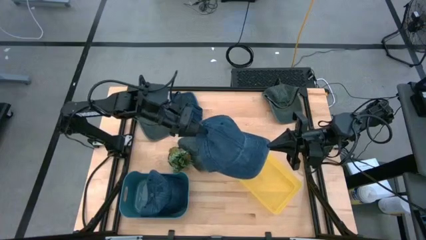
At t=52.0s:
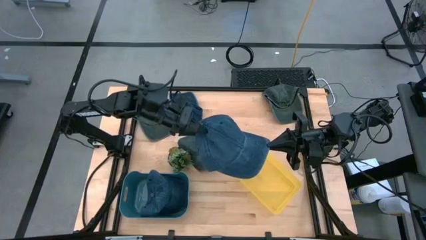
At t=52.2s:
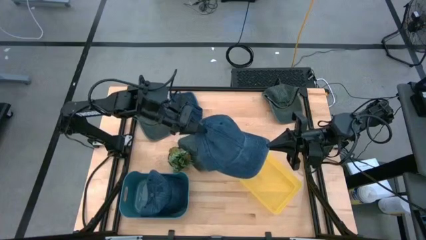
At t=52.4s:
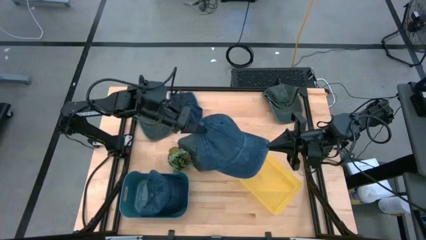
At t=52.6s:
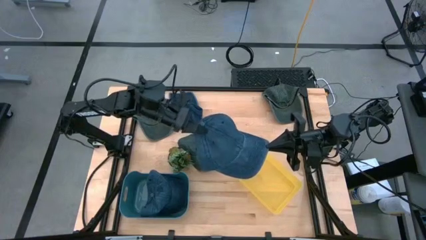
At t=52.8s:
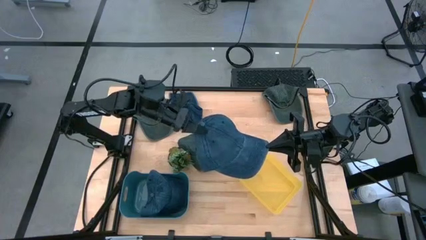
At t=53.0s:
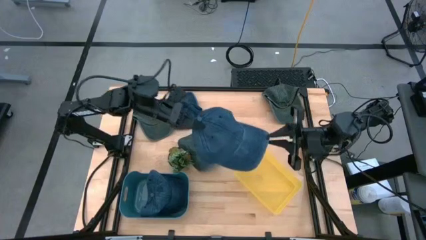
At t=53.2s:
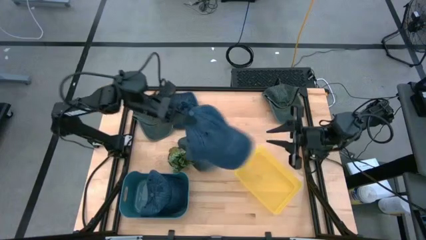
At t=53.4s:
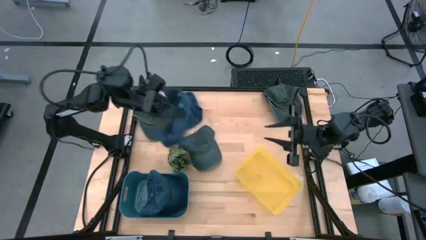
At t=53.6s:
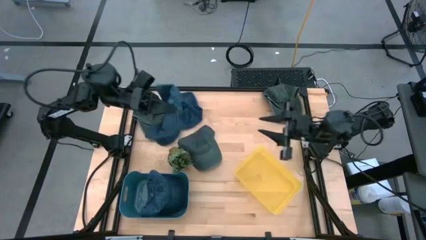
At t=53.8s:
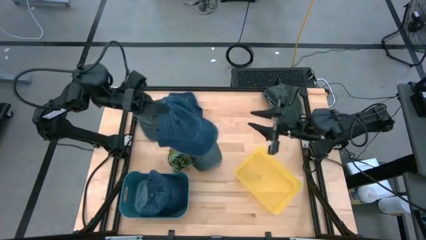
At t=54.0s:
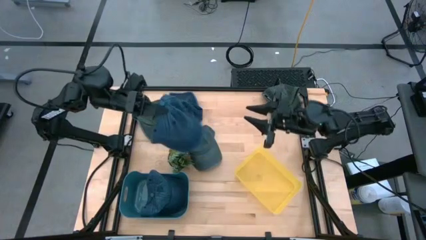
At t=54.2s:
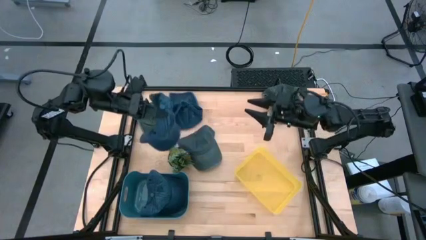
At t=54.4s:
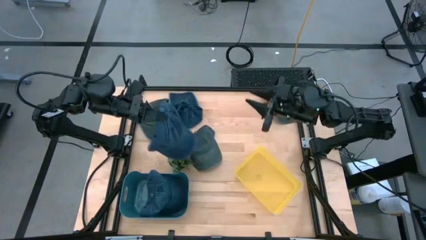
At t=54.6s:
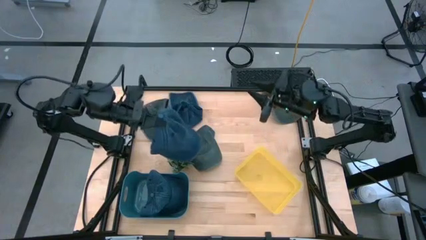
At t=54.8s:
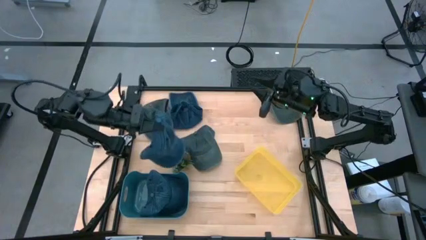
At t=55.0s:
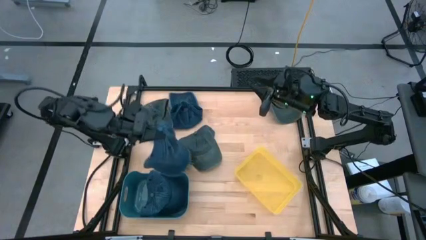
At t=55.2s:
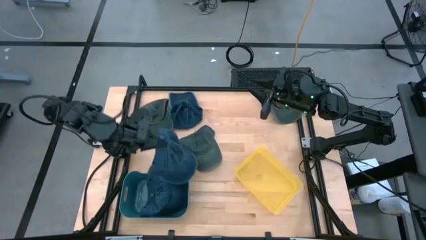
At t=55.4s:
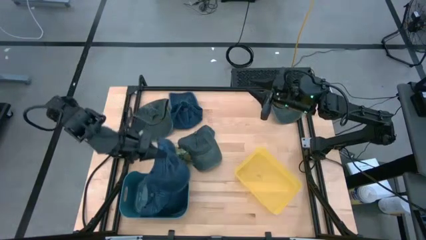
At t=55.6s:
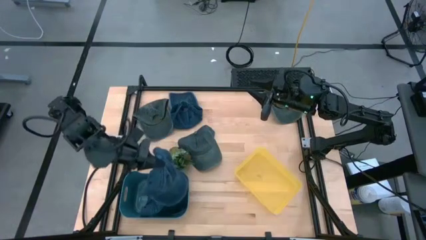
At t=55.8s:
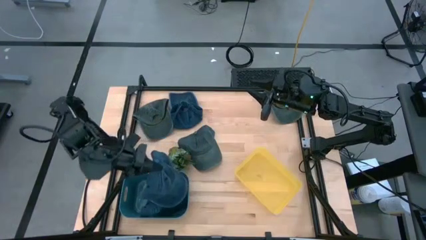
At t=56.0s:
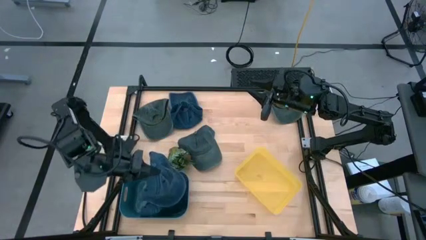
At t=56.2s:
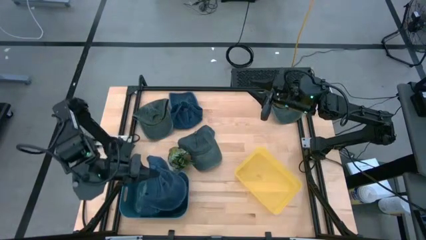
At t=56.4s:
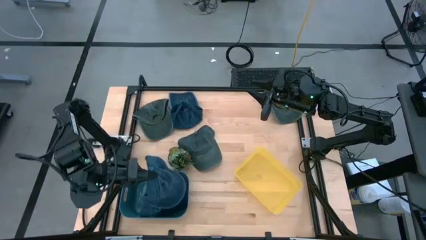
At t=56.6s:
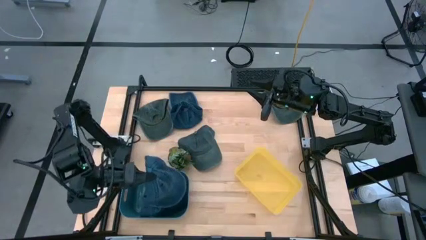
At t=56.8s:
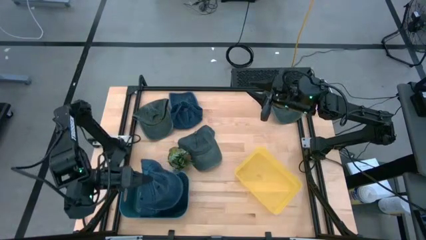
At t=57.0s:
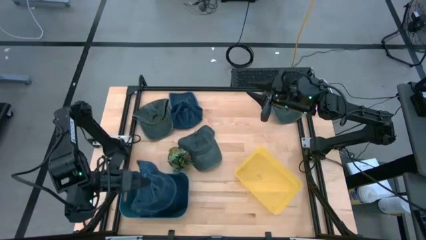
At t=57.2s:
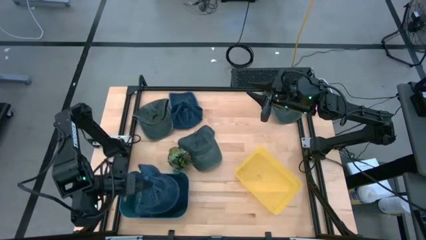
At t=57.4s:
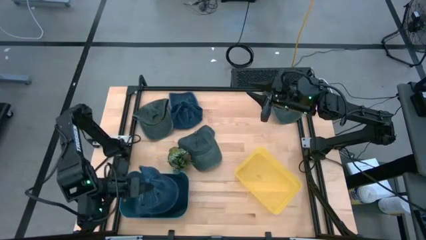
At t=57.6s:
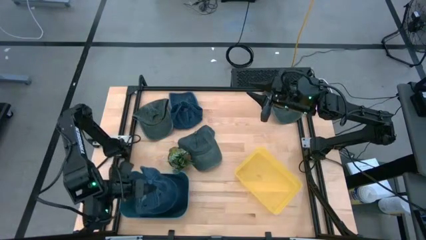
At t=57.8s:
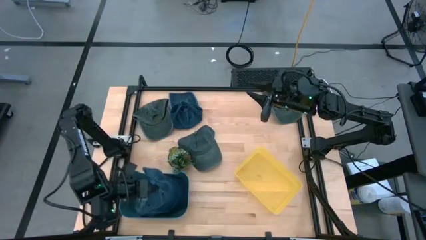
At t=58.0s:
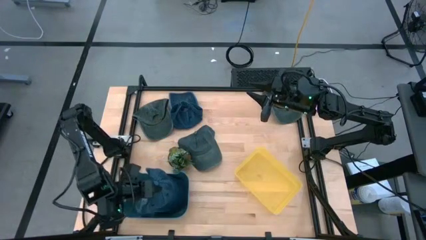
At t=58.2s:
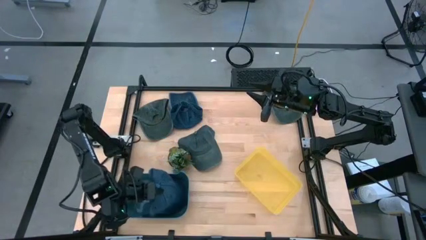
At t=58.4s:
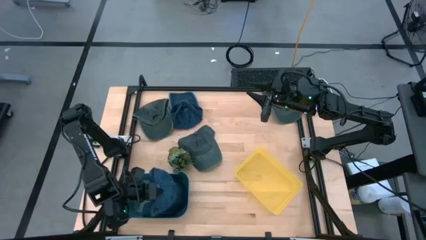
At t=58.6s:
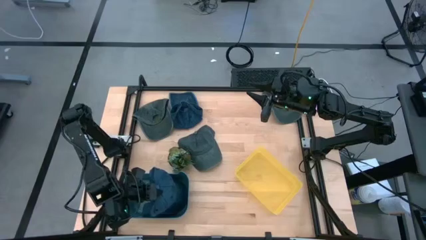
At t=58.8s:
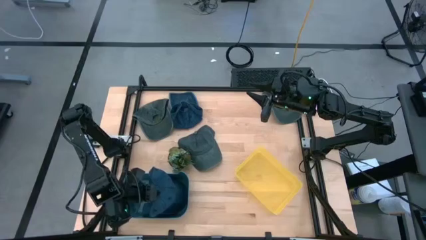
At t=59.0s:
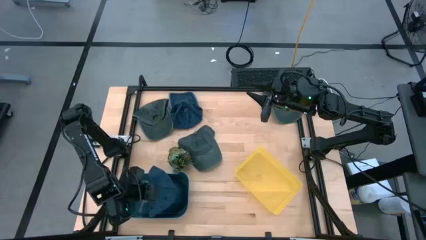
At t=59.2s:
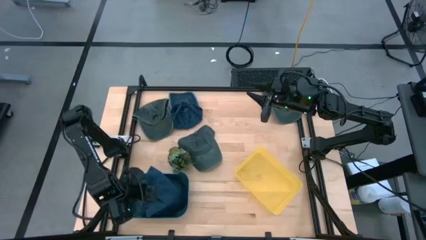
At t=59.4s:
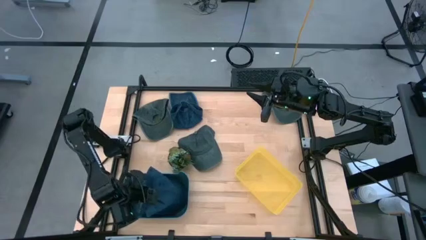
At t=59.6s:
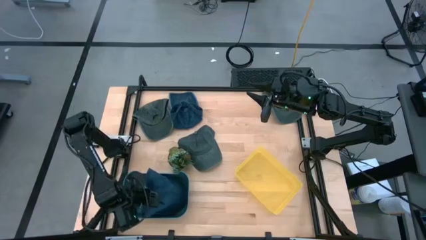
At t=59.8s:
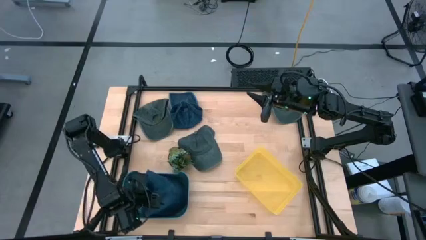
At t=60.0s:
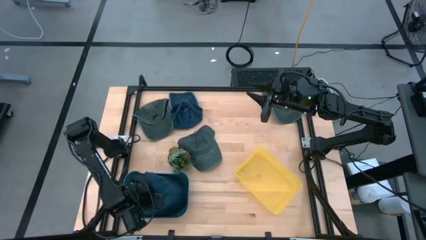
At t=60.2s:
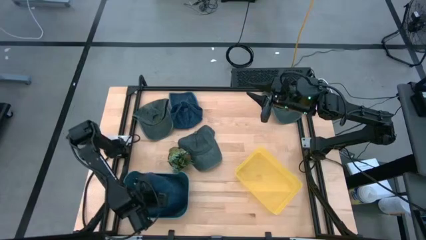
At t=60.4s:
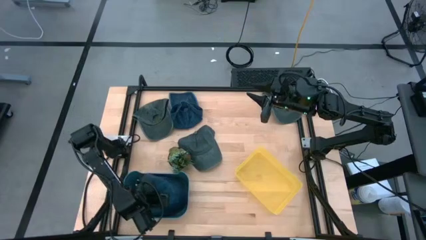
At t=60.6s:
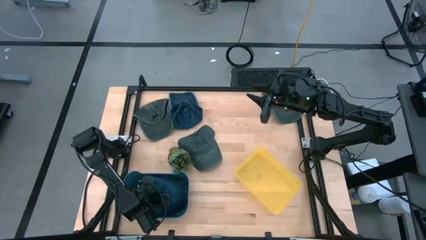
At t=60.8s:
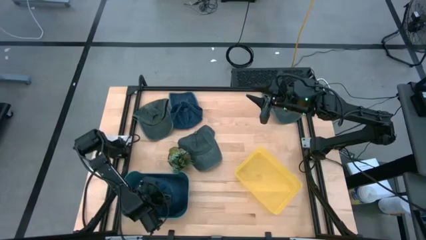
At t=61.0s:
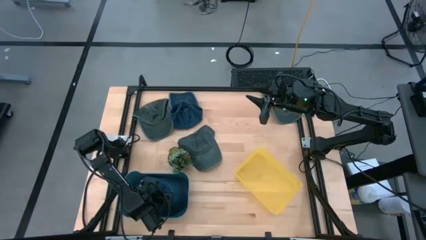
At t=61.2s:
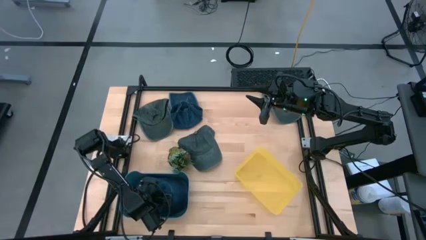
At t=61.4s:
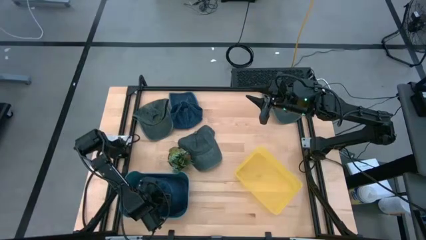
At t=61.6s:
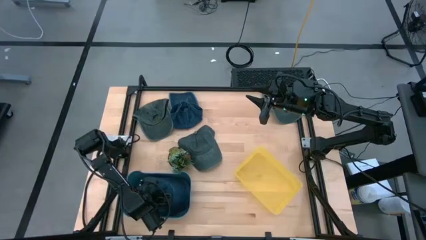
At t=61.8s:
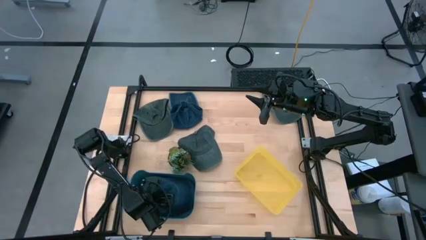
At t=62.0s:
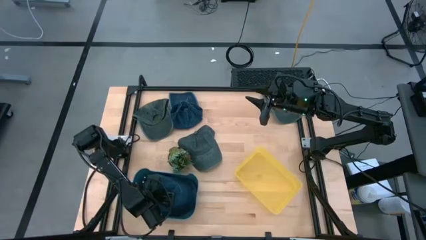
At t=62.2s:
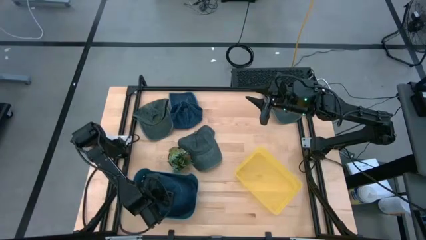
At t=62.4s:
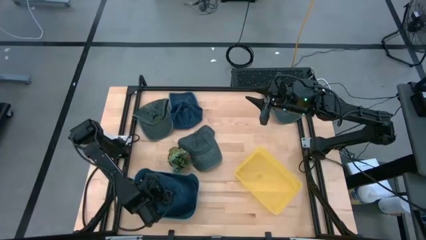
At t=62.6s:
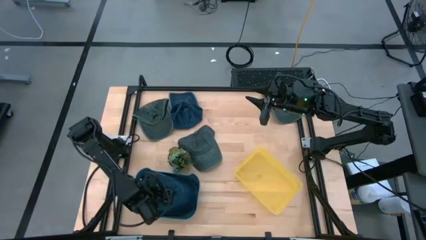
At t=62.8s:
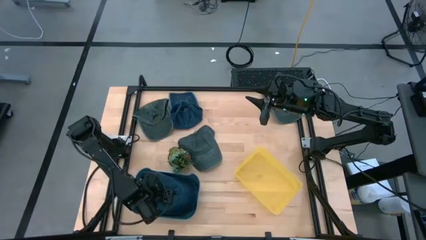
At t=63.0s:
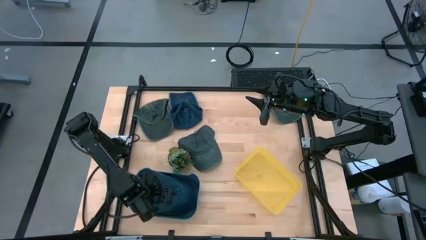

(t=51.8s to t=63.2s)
Task: Pick & Place hat
Put the right blue cap into the blue bin

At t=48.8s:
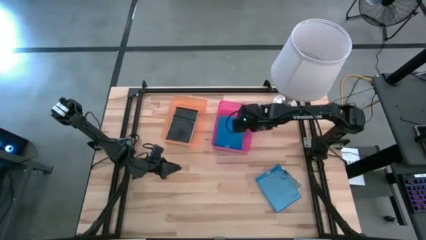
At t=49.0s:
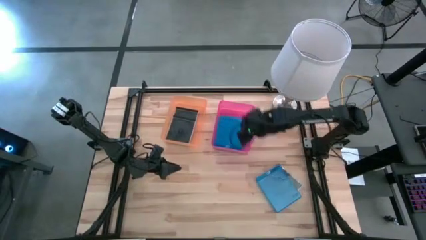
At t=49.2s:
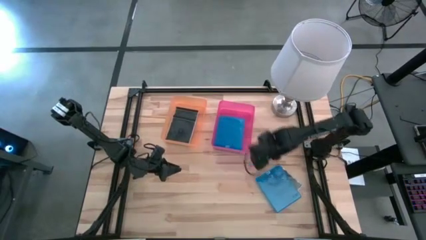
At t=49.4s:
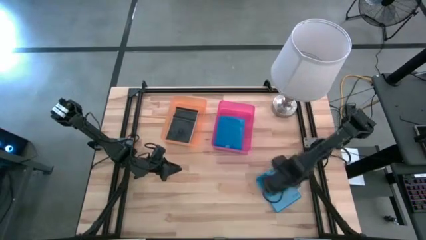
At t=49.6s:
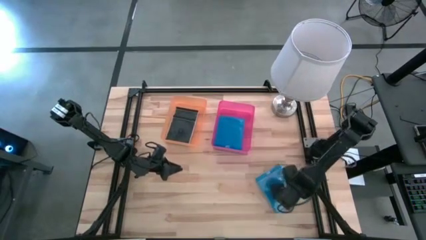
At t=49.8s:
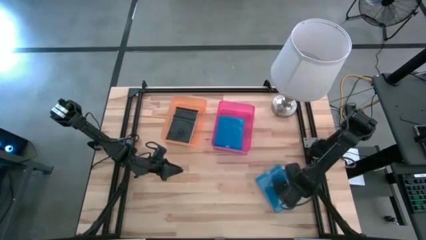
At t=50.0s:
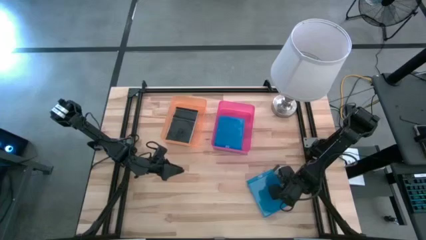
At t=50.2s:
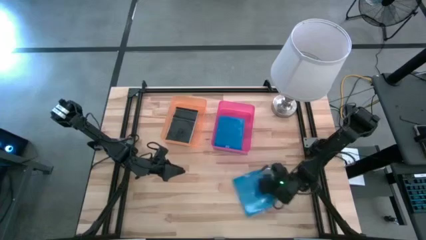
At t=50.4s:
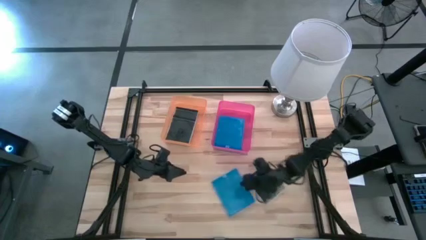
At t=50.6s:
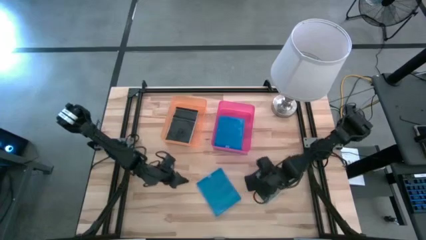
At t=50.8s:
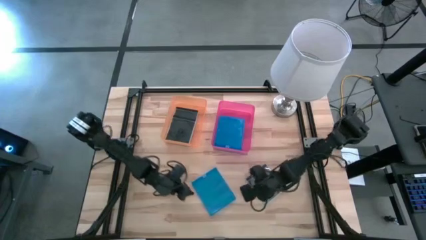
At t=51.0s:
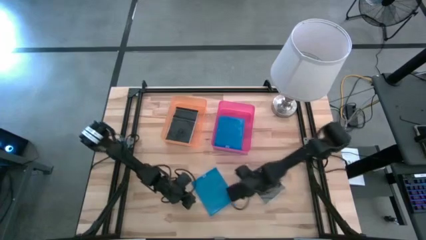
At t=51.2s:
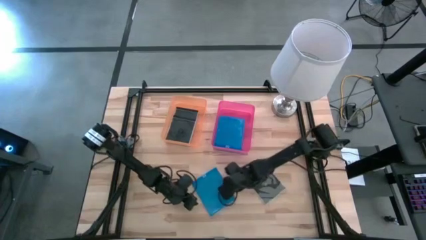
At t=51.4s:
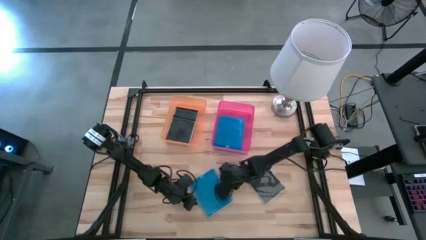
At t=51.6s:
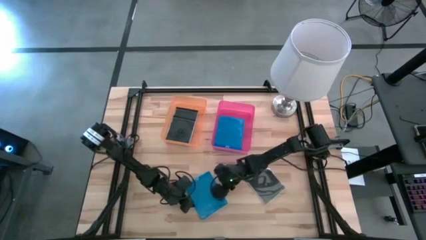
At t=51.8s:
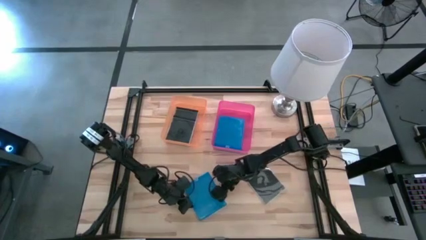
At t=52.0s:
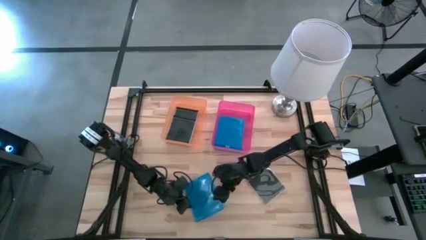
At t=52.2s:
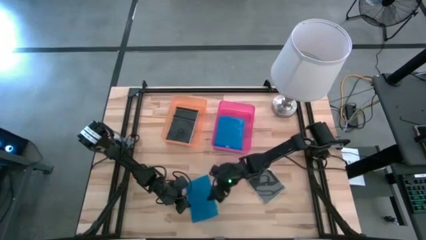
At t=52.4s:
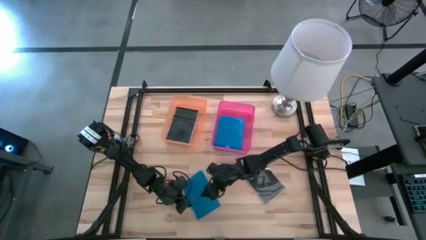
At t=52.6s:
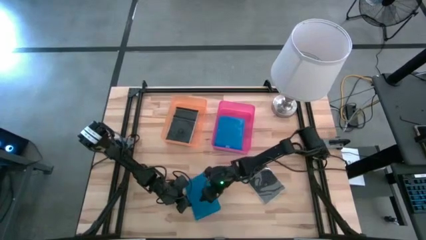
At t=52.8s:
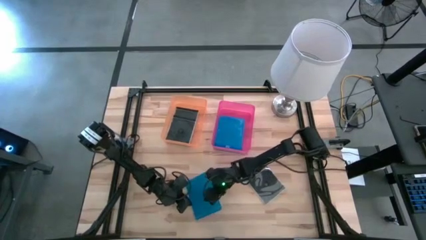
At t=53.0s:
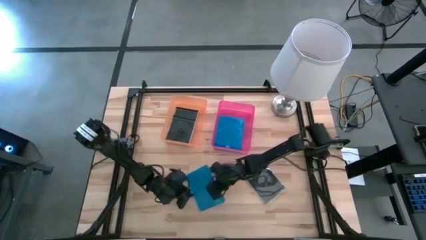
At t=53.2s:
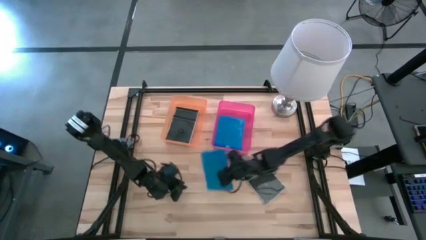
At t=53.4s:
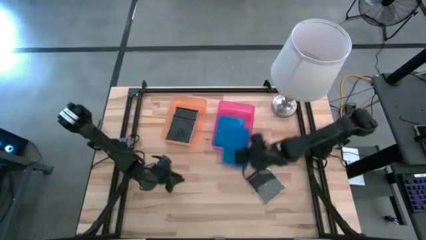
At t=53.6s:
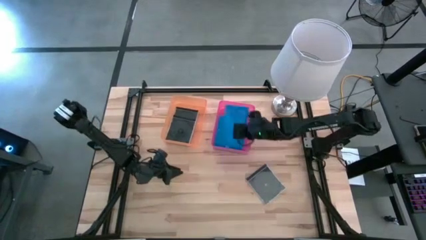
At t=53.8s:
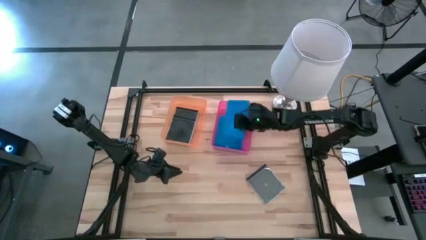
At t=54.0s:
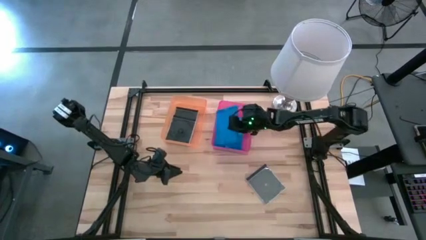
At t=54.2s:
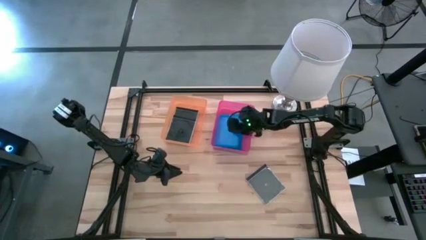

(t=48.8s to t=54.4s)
Task: Pick & place jewel cases by type
Put the blue CD case into the pink bin
